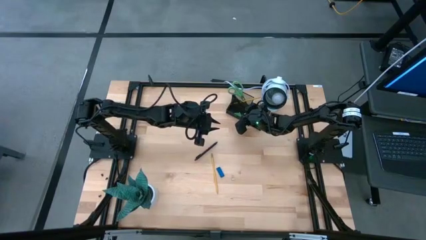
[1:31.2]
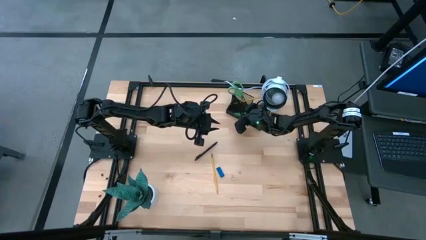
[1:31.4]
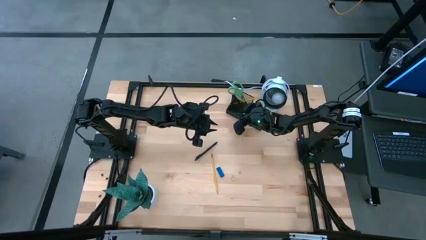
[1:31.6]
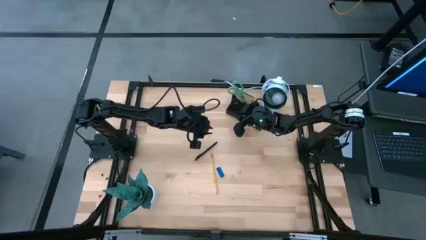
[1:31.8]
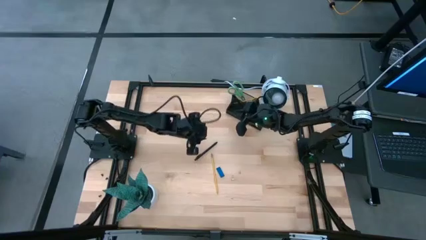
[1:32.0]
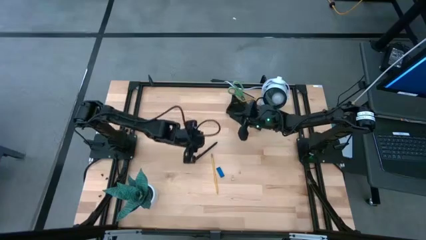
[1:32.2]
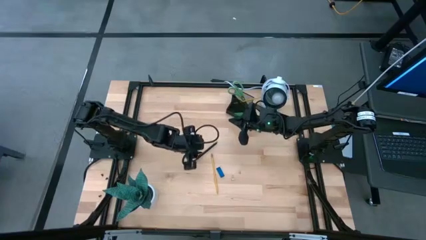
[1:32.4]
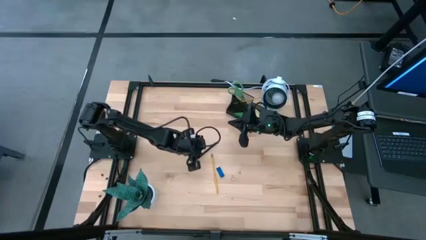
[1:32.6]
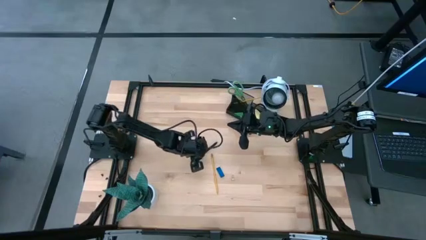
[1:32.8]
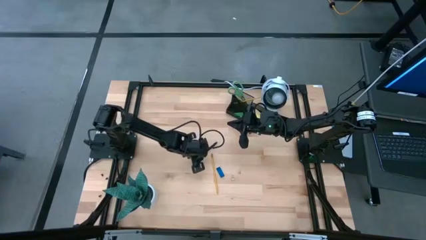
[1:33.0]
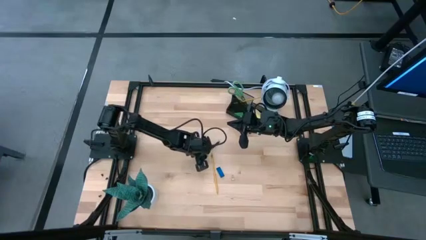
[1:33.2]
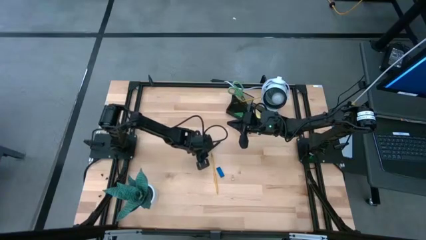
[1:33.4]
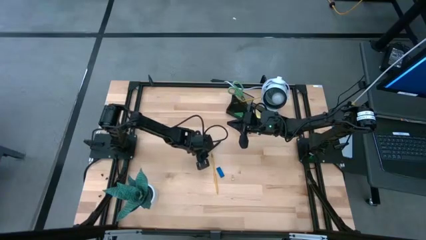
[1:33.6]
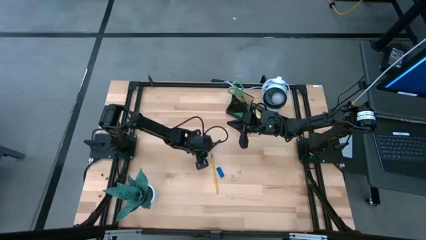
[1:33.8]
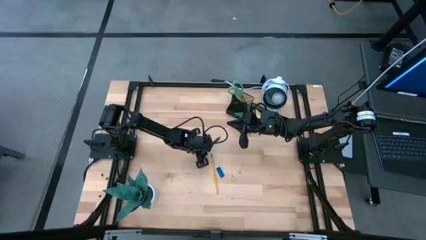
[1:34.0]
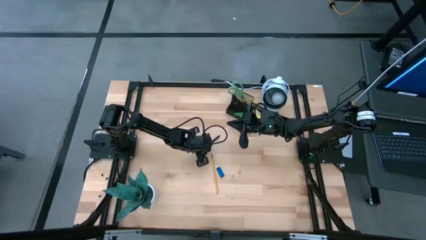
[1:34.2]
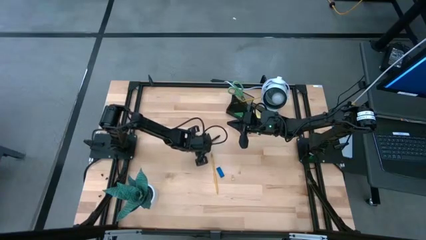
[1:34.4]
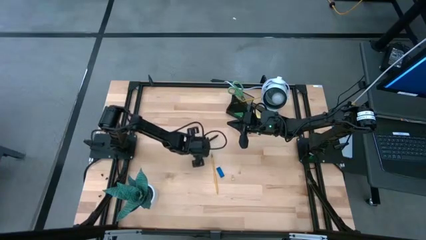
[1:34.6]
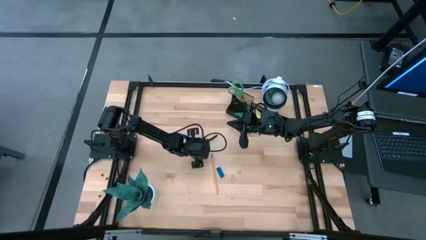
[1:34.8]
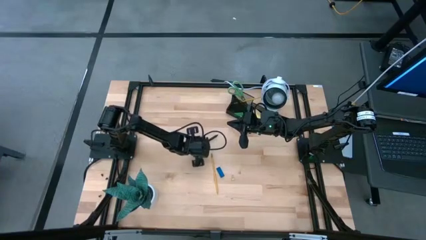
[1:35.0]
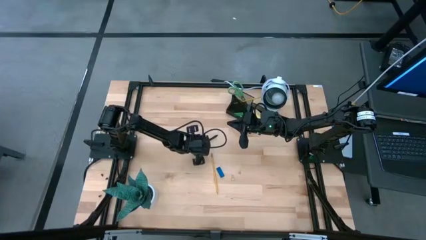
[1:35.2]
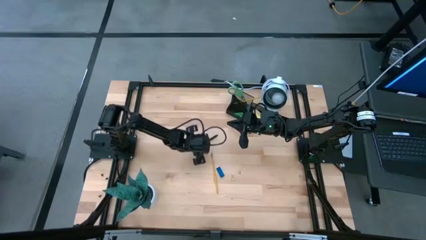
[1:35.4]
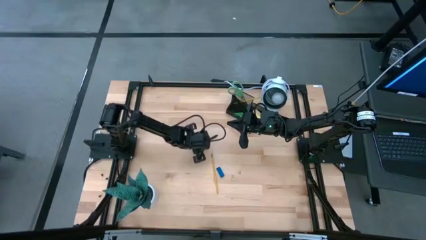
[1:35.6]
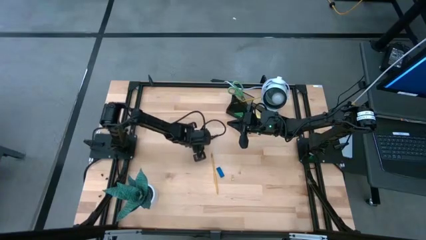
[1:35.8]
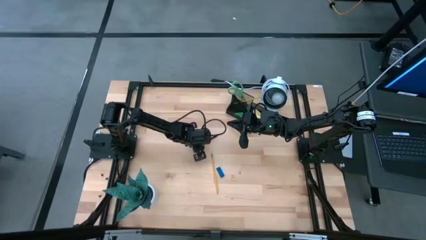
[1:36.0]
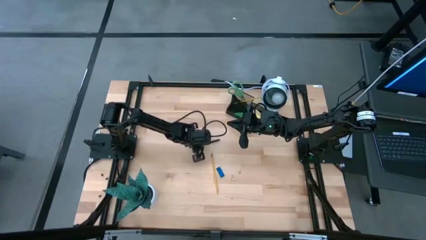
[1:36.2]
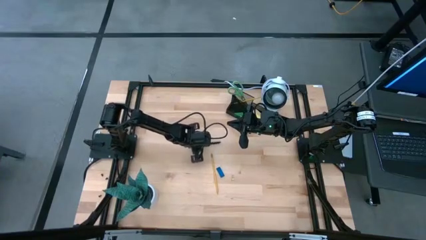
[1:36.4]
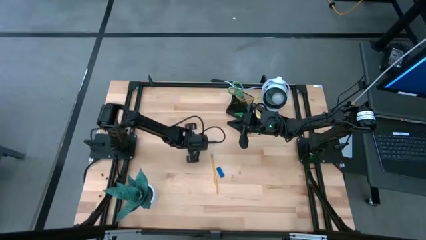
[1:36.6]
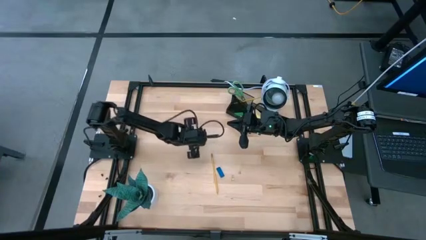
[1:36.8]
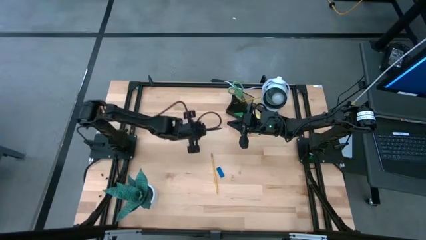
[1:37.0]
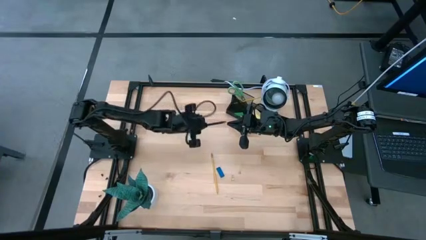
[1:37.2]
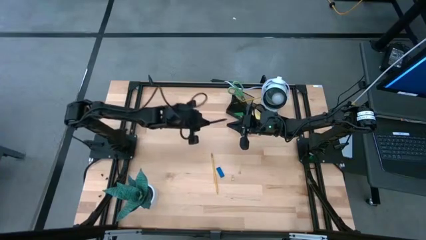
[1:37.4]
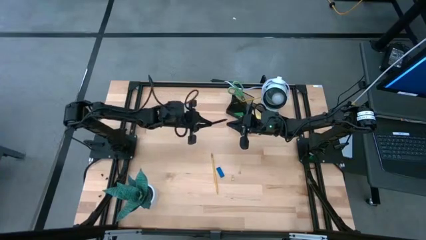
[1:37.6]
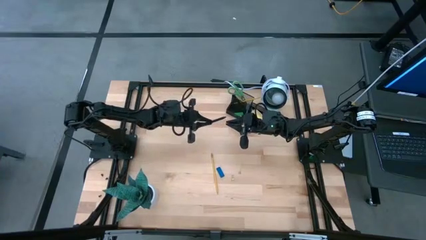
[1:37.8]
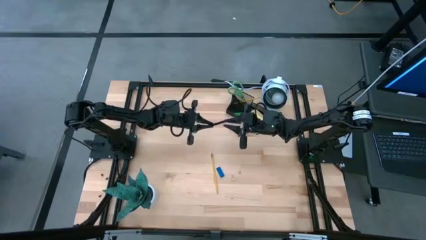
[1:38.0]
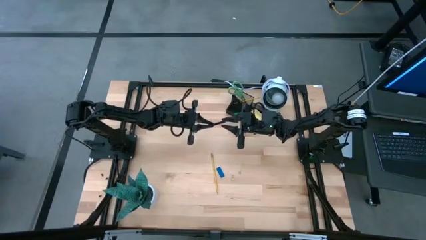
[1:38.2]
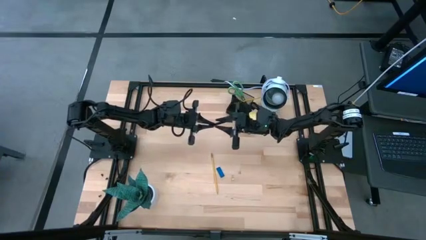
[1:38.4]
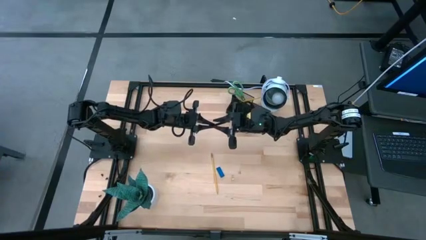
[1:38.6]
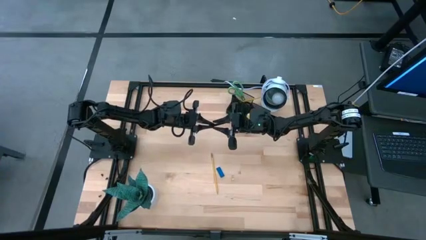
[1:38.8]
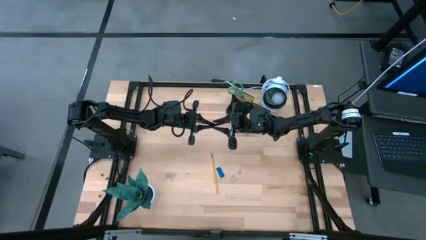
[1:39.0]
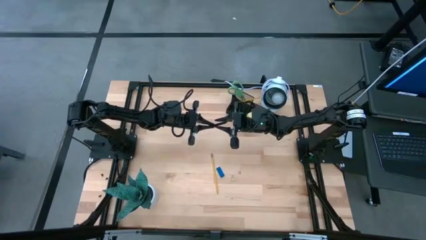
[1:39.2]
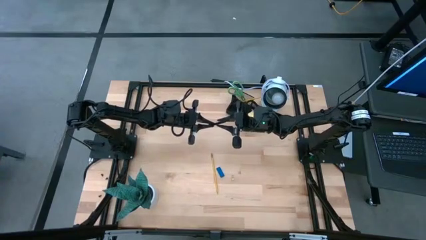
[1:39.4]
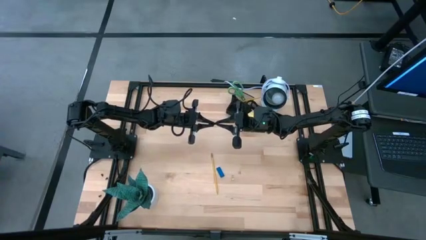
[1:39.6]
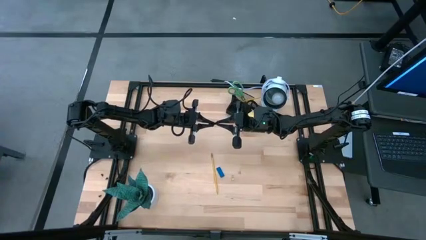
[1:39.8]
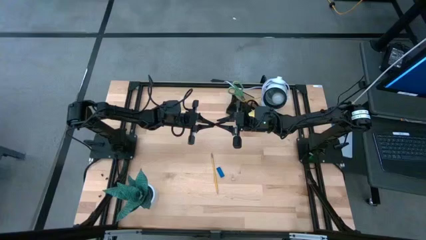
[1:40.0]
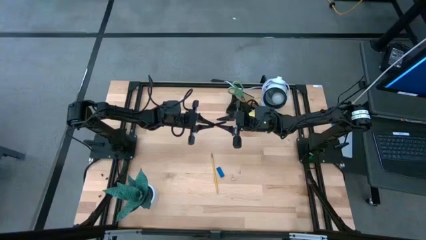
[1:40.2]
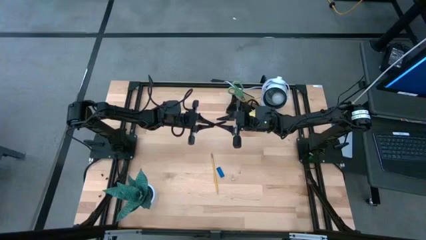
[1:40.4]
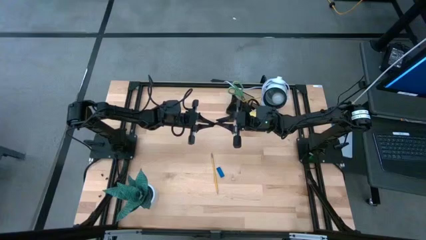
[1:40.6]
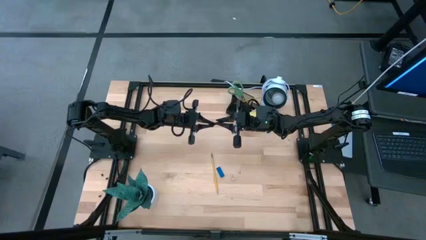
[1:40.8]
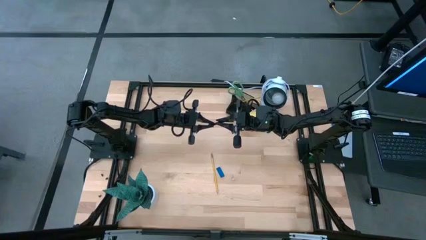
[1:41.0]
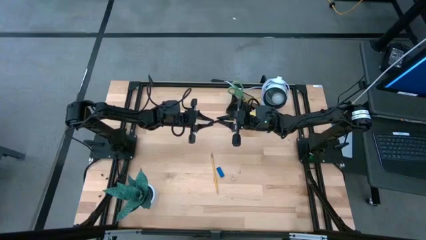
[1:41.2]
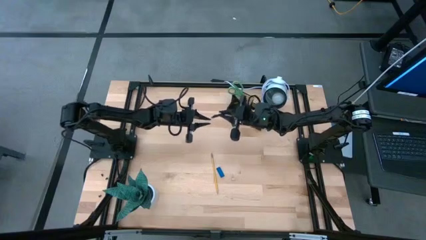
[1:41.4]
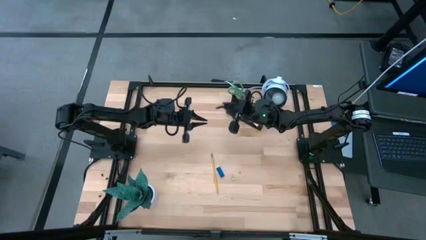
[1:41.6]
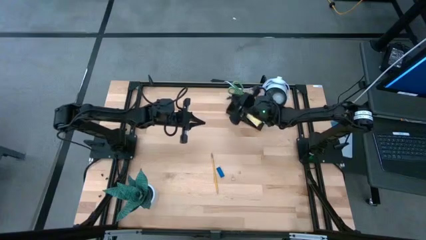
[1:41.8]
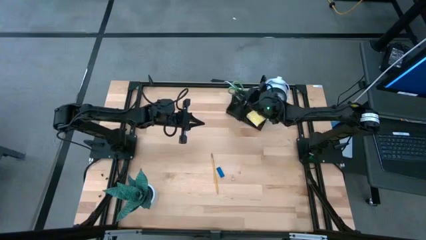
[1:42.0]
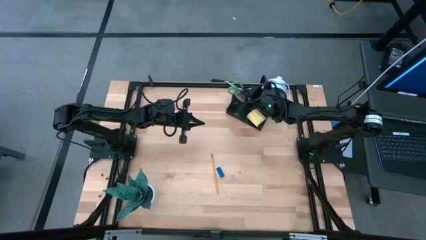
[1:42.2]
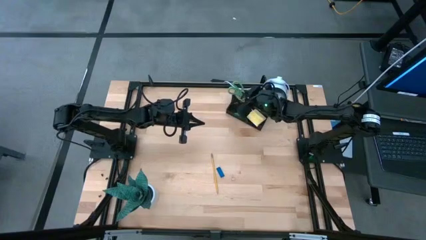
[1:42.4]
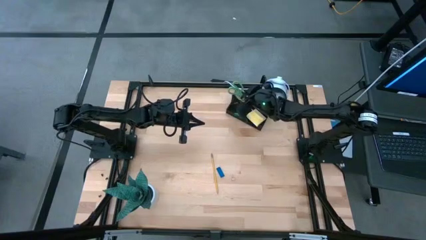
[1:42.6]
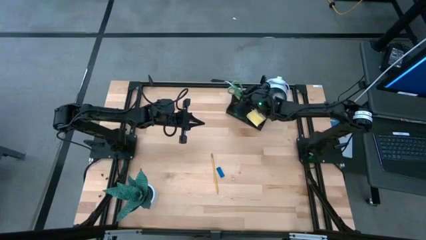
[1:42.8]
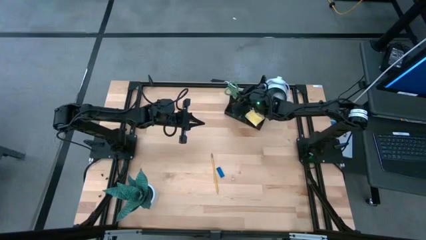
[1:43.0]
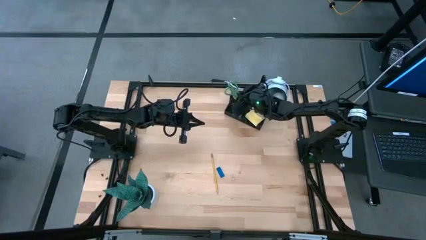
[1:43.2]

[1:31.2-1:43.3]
Task: Pick and place office supplies into organizer
Put the black pen into the metal mesh desk organizer

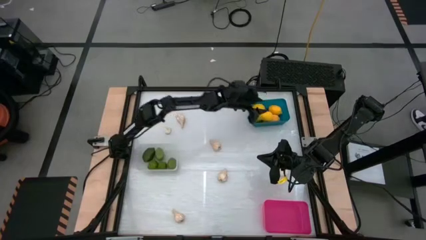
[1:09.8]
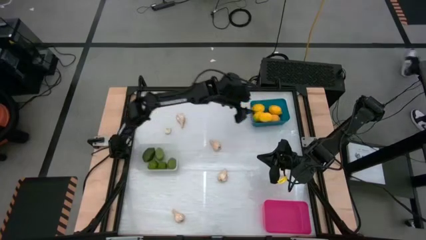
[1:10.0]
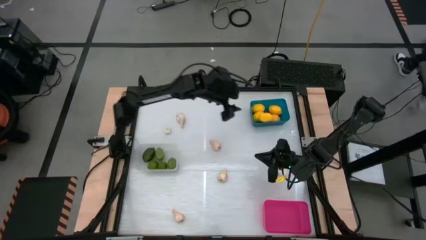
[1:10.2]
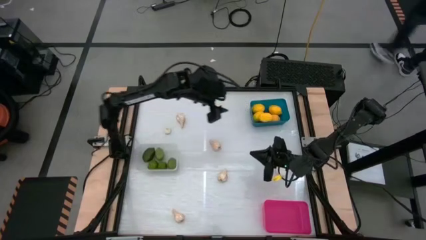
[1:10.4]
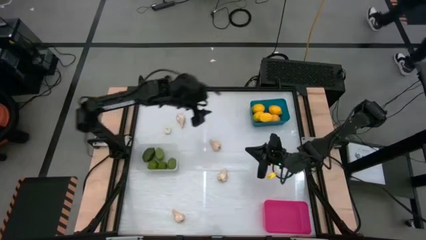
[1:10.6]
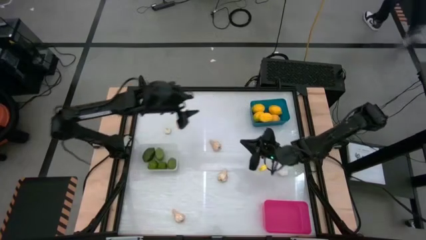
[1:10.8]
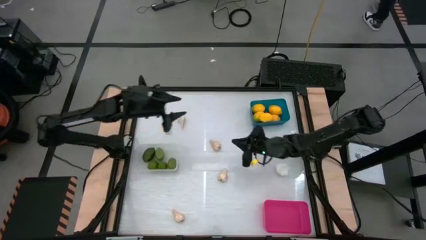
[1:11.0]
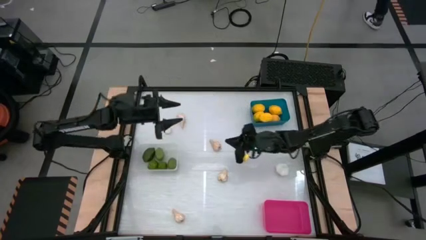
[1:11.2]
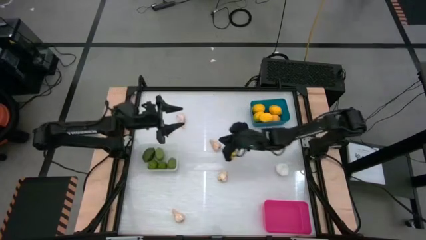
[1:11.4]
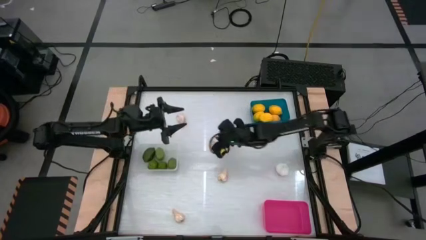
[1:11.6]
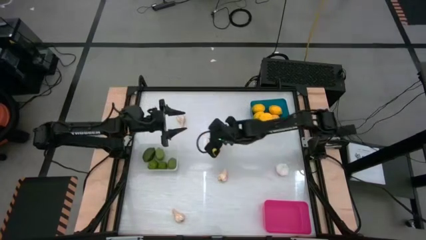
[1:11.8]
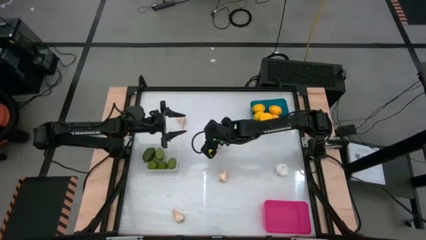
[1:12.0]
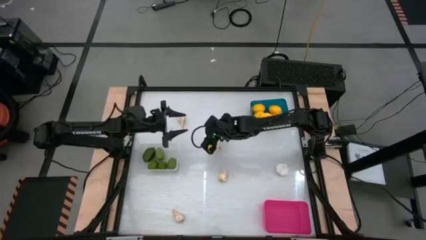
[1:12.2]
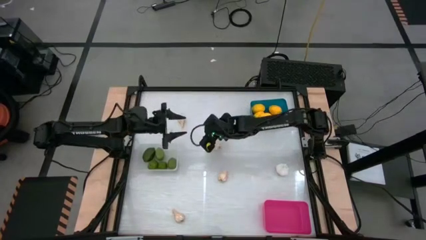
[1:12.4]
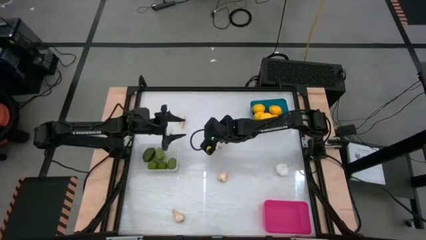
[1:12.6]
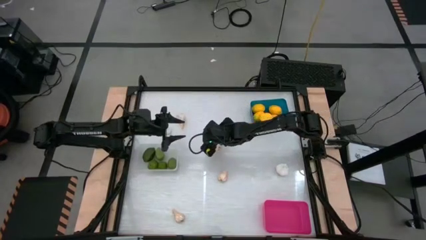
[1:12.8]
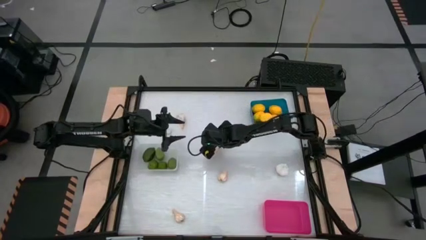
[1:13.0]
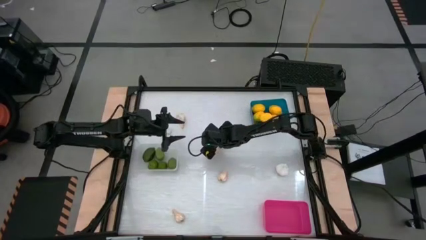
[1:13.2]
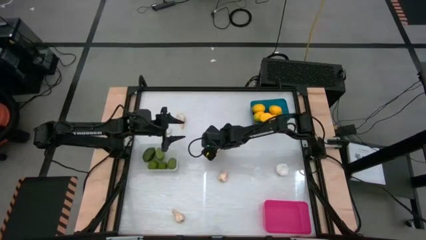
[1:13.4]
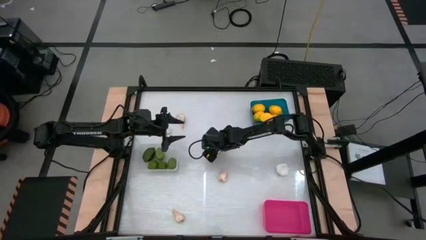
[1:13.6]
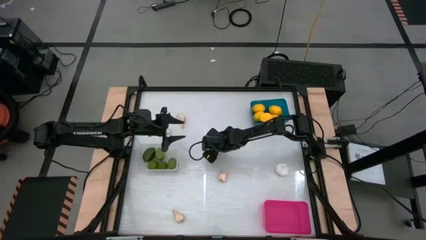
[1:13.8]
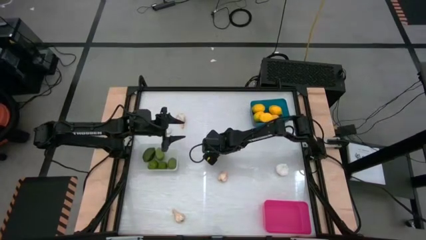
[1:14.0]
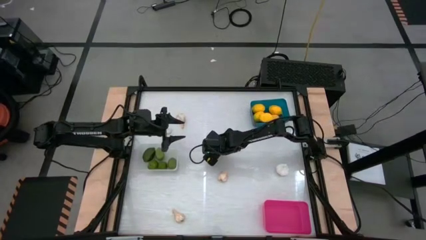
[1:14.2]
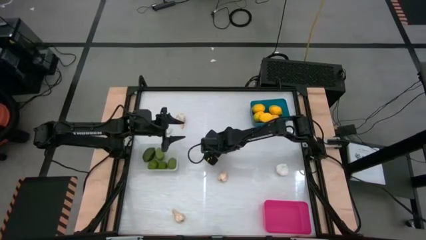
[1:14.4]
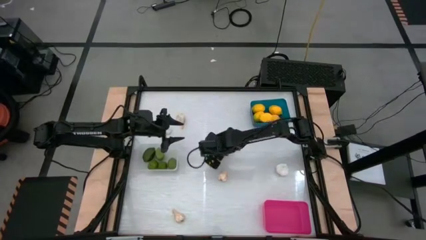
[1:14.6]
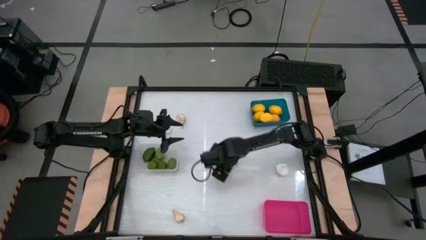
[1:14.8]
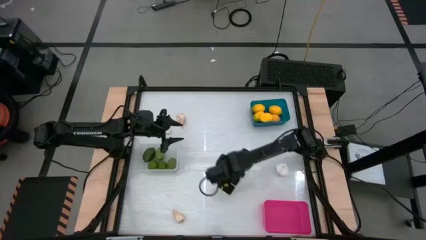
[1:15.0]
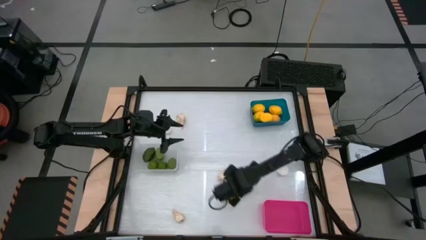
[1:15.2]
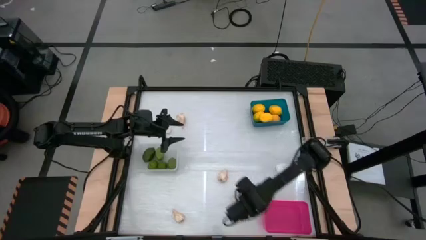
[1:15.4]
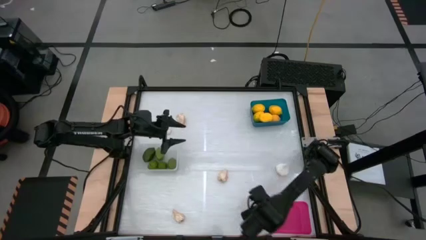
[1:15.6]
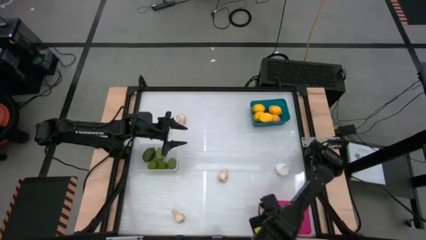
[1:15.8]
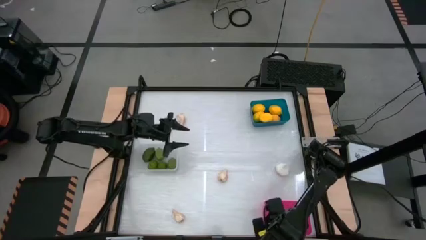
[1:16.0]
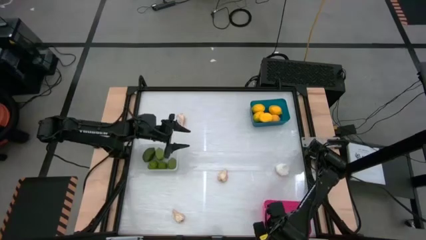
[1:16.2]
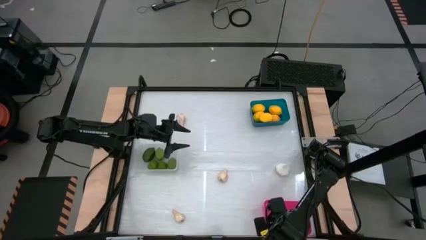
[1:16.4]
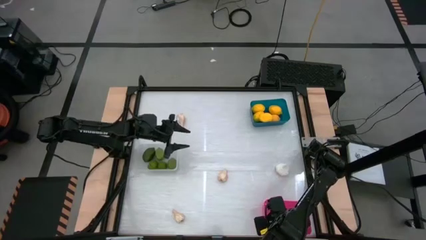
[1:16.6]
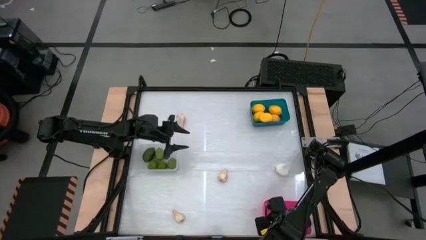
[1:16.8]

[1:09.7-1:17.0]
Task: Sort produce into baskets
Put the white garlic into the pink bin
